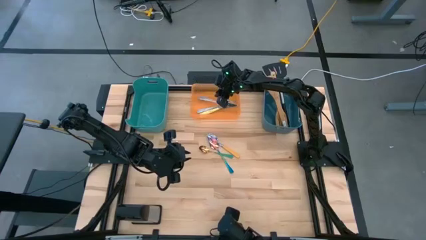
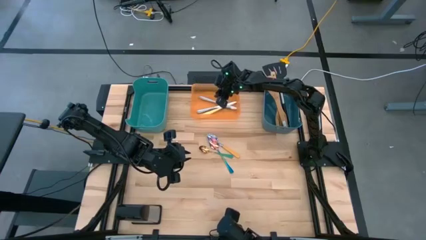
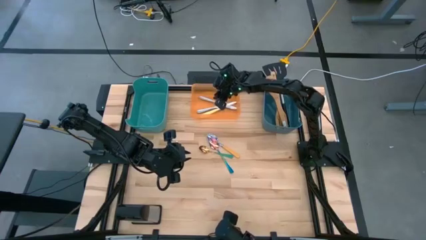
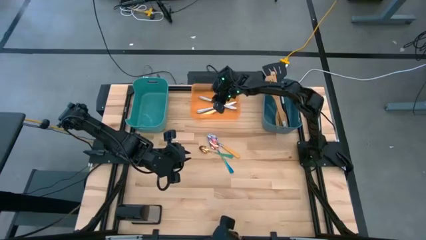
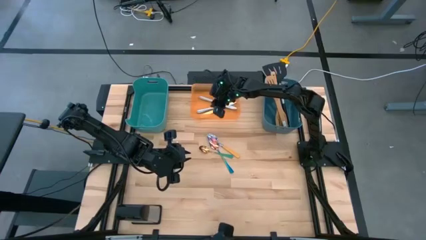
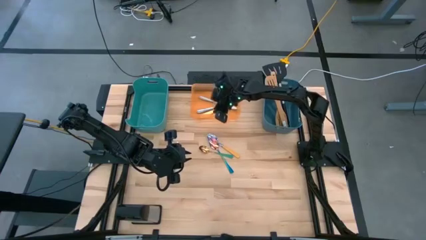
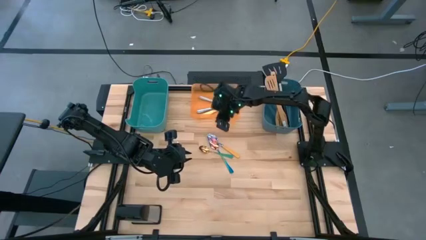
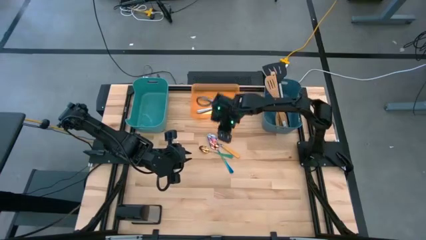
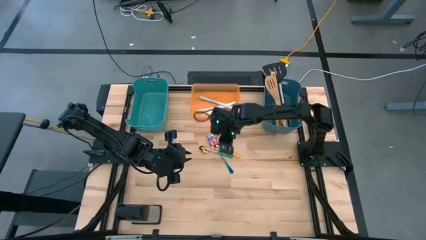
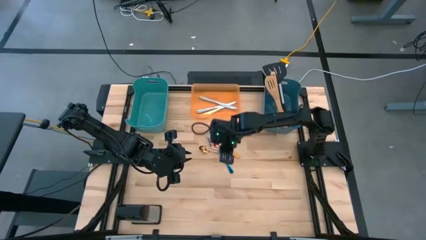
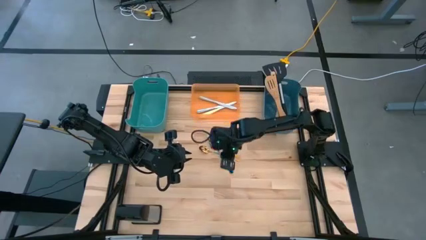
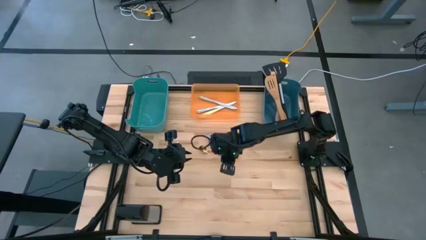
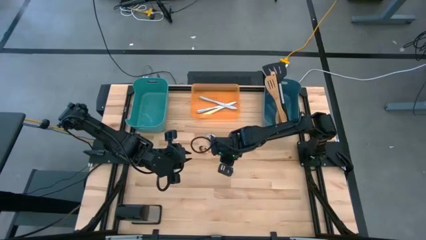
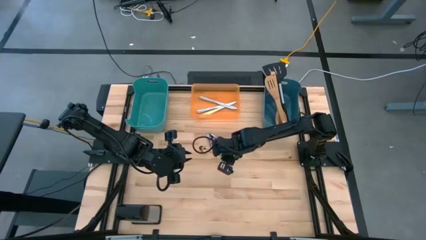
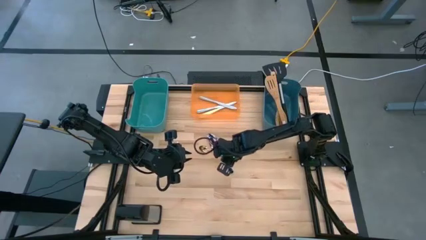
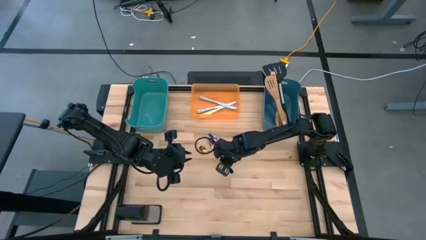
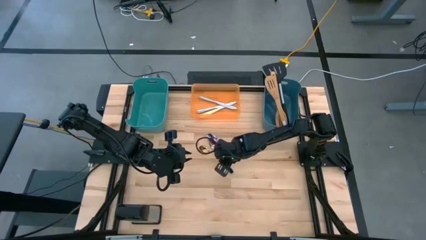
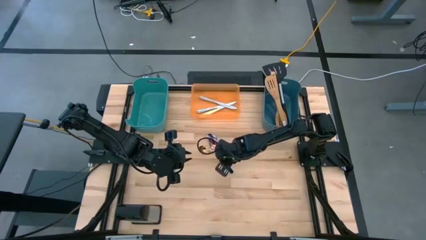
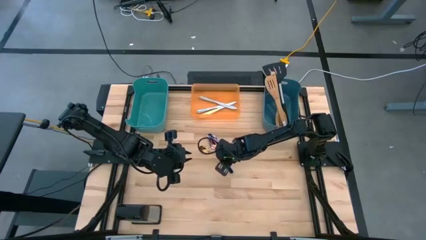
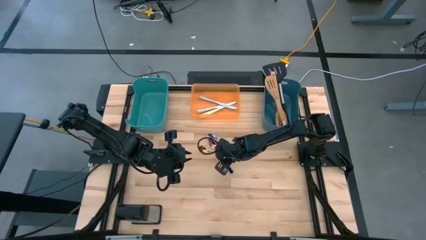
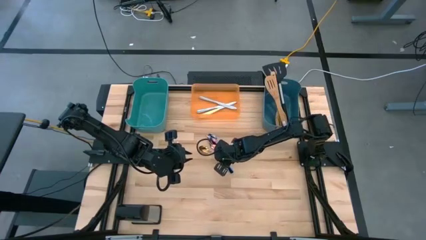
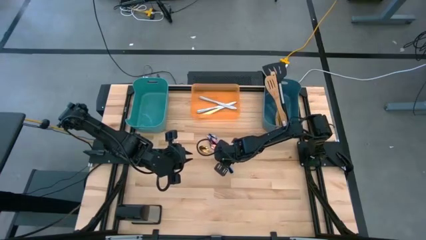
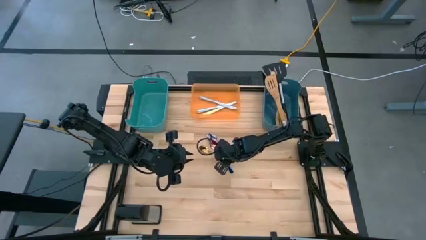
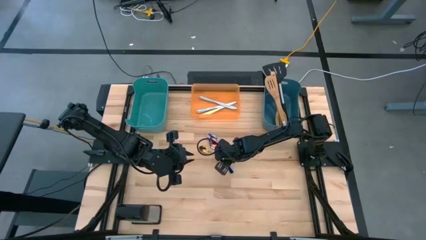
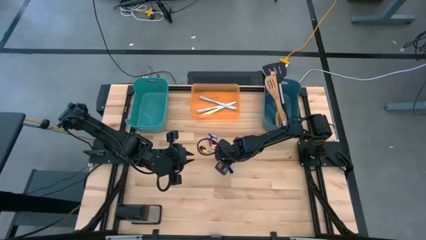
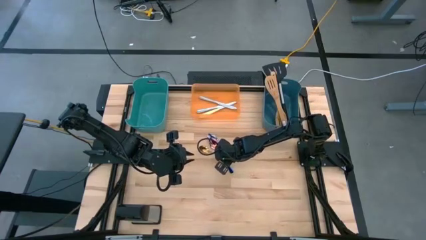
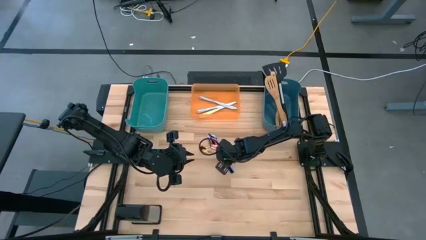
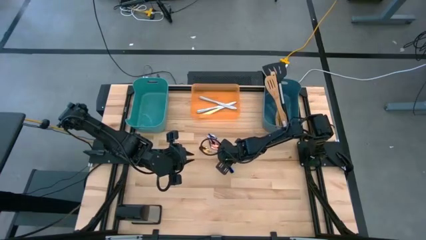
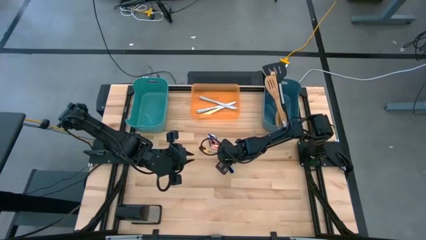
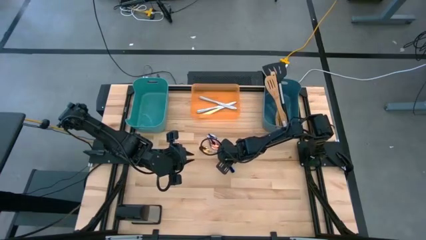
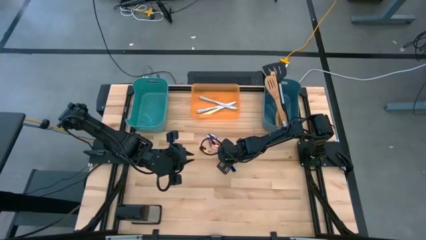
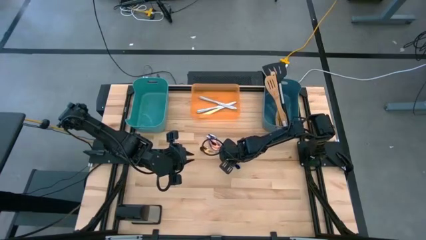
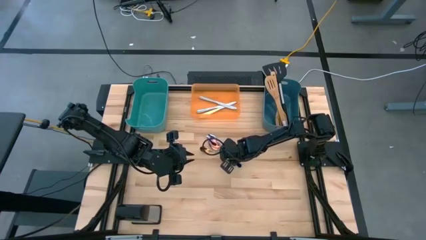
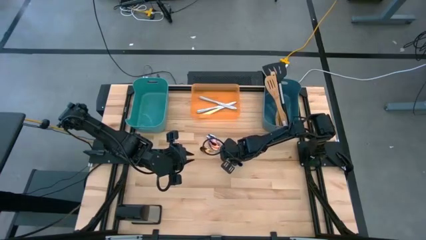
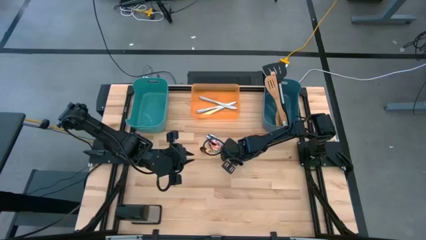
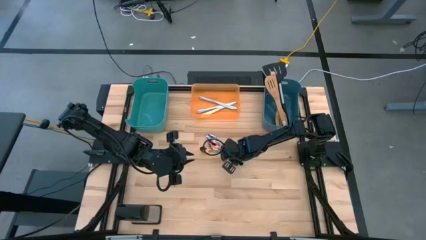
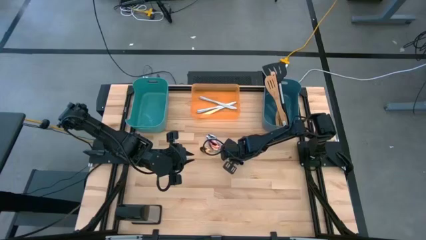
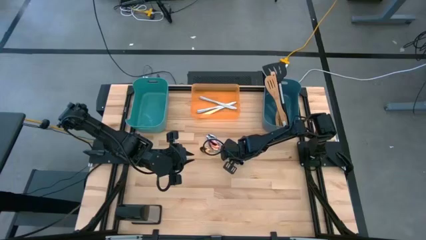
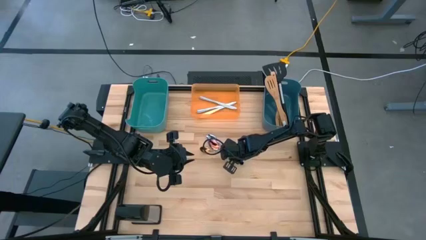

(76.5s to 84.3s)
Task: Pick & Place Kitchen Items
Put the blue spoon into the green bin

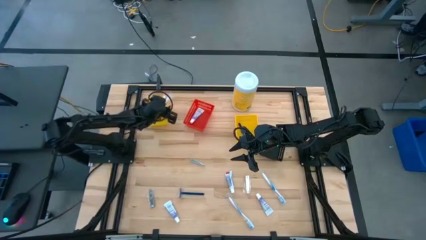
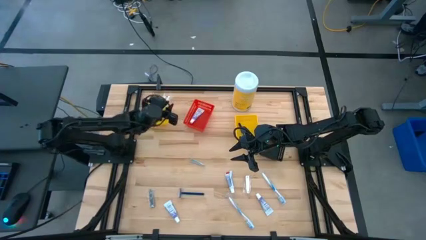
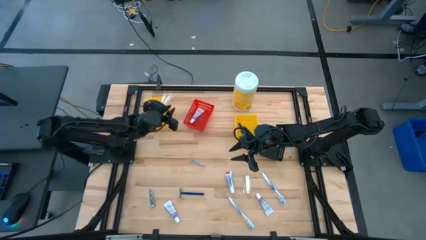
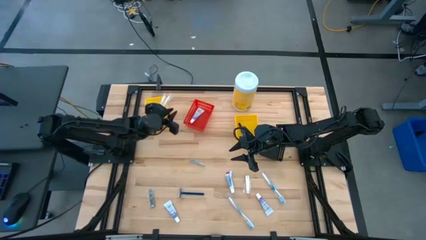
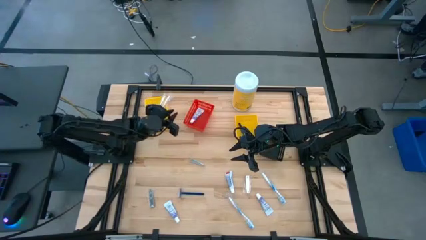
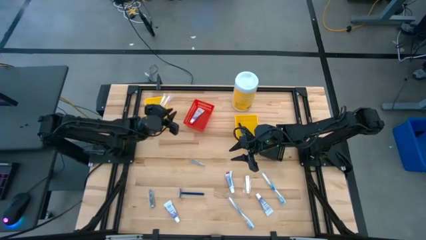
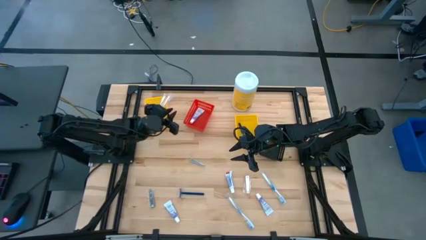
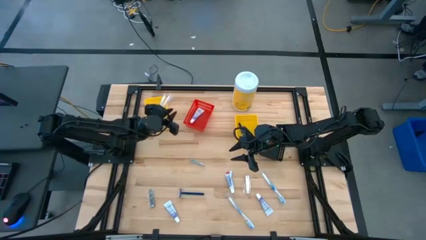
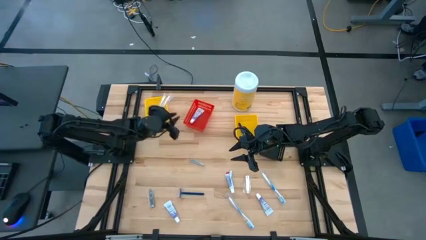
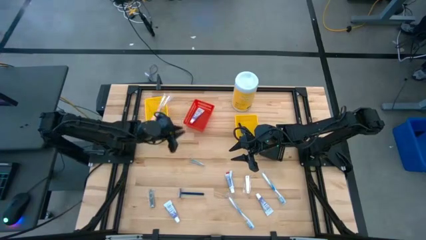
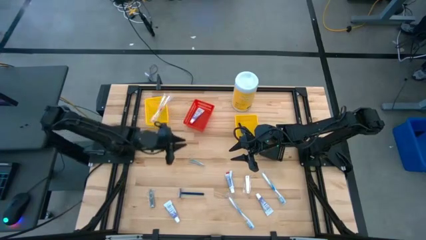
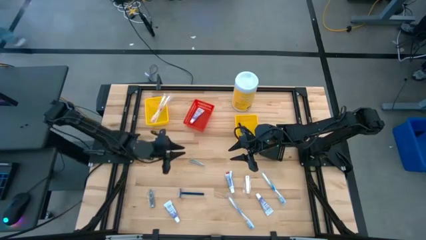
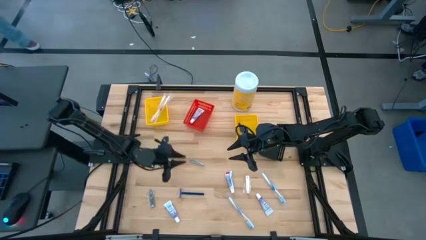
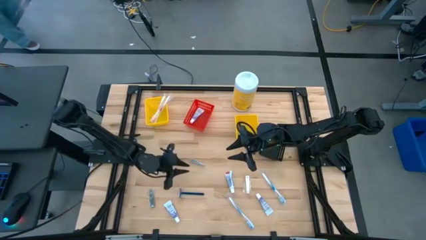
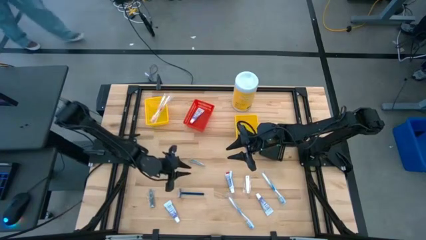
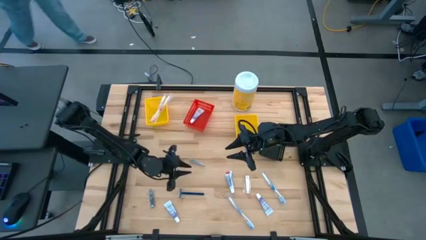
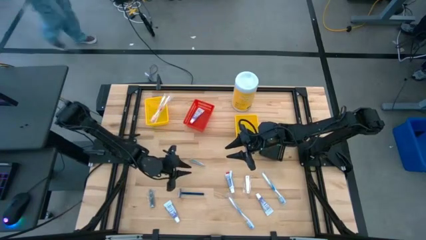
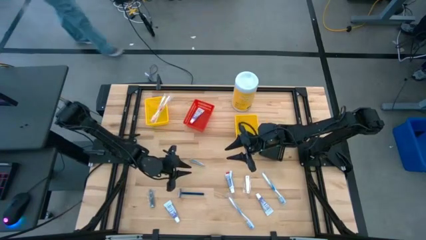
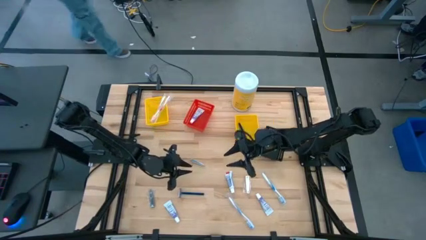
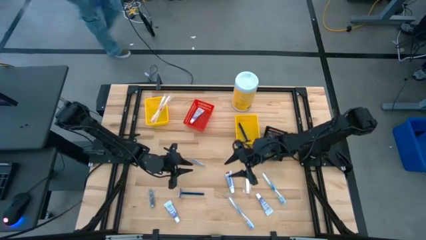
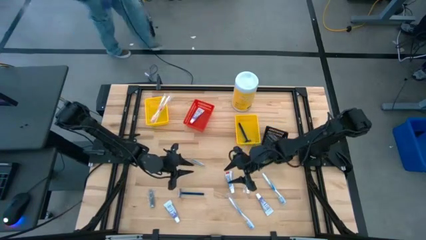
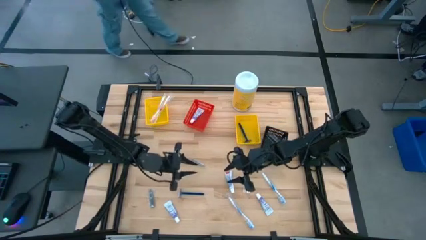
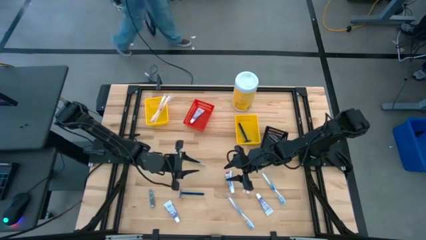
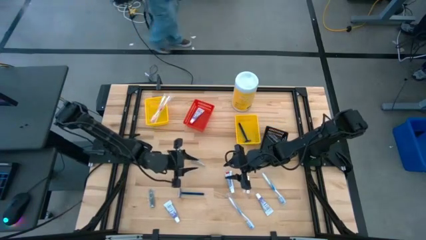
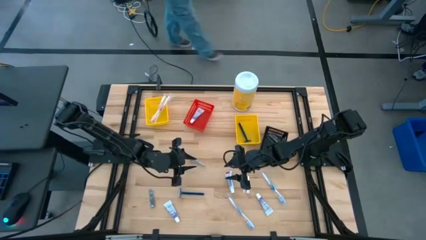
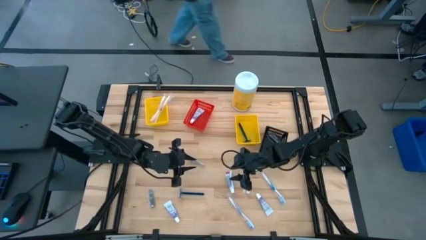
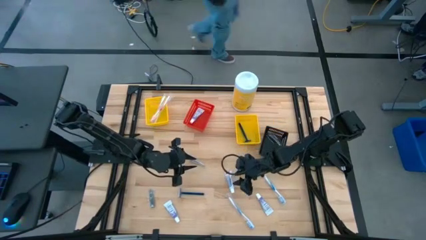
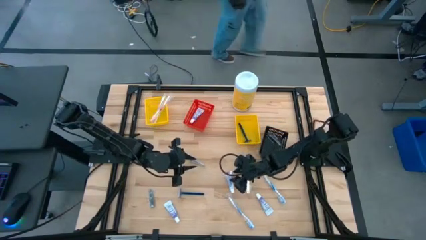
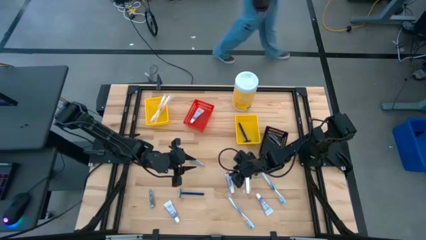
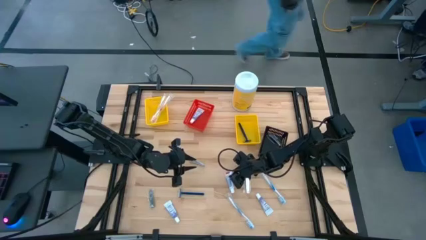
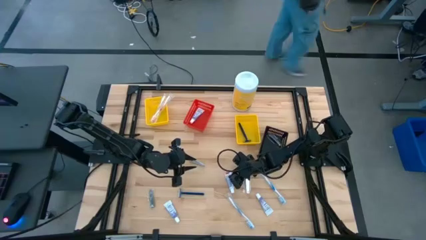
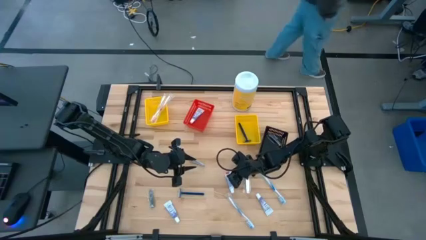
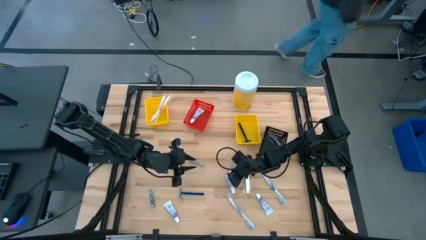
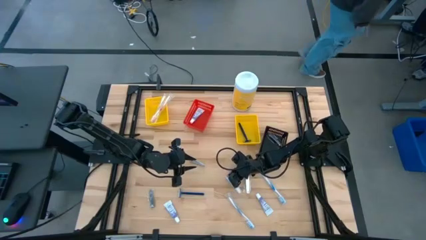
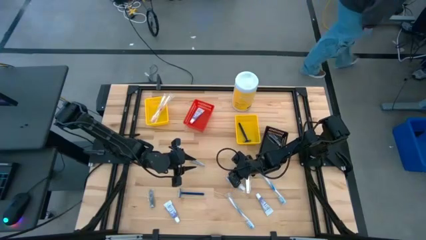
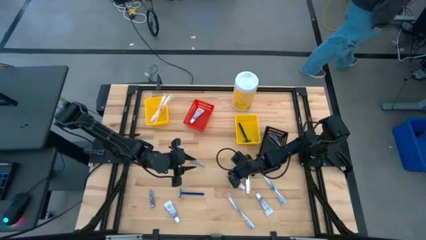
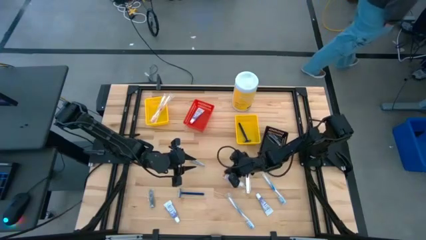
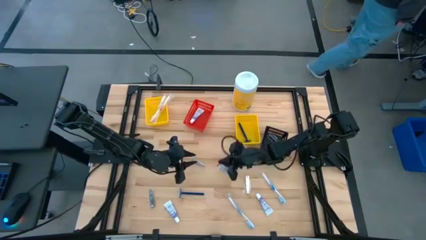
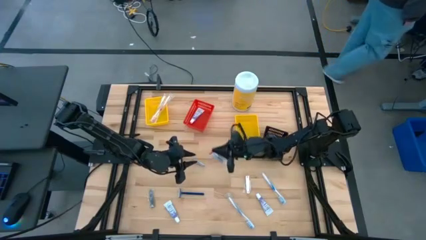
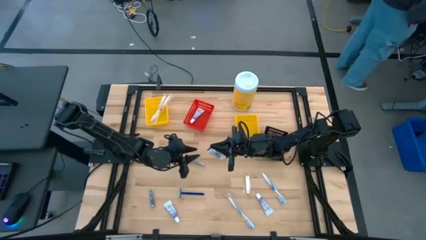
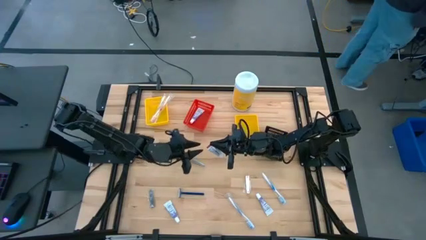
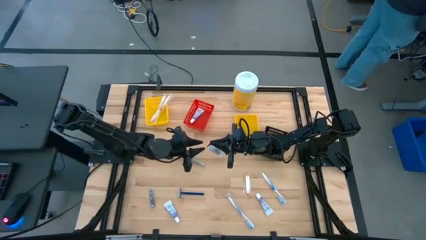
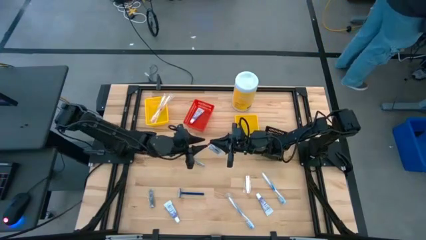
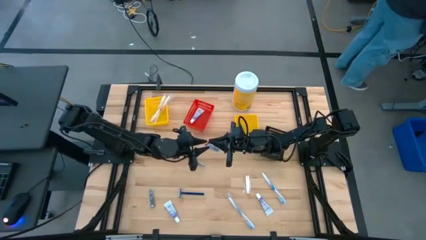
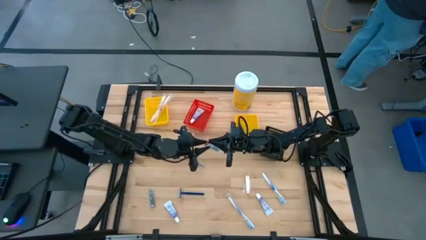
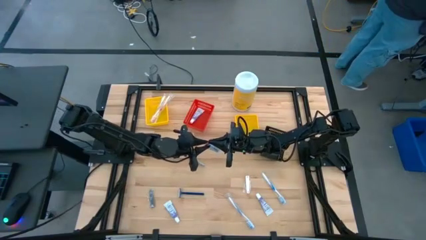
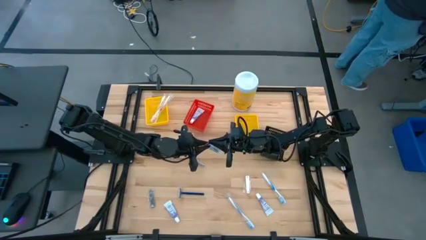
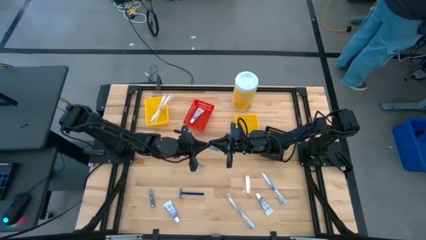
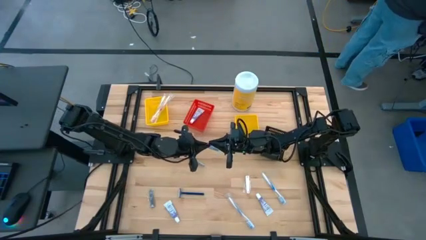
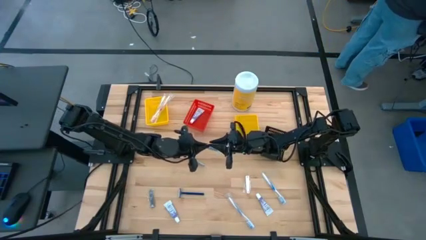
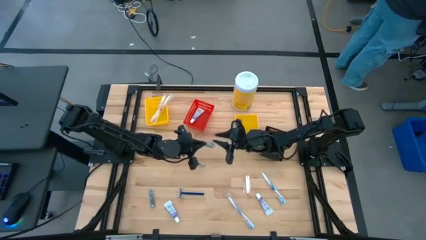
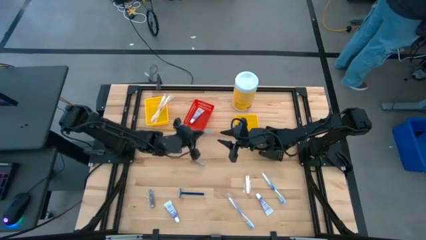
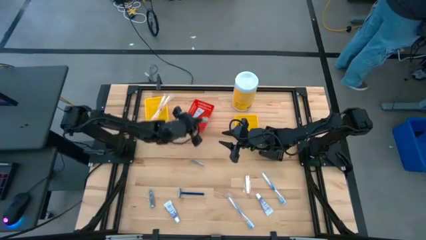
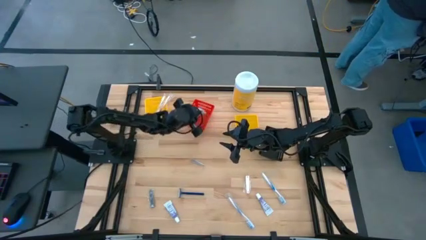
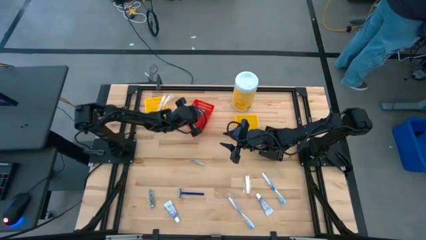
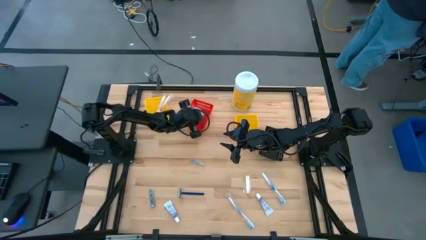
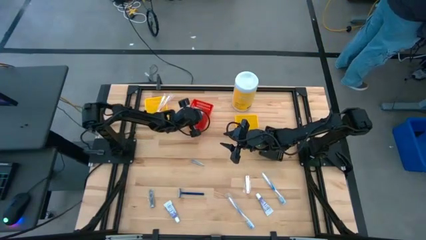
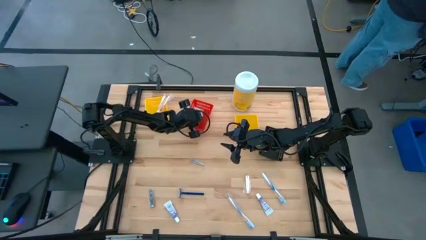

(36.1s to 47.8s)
Task: Pick & Place Travel size toiletries
Put the white toothpaste into the red basket
